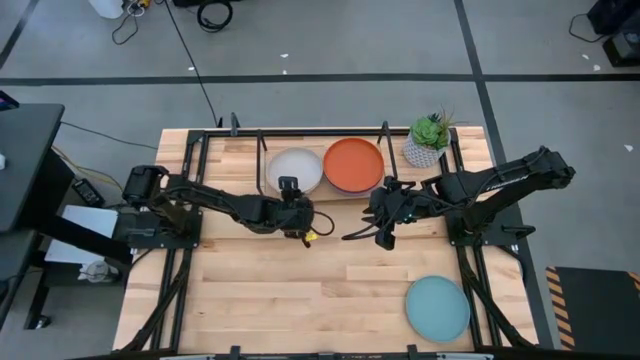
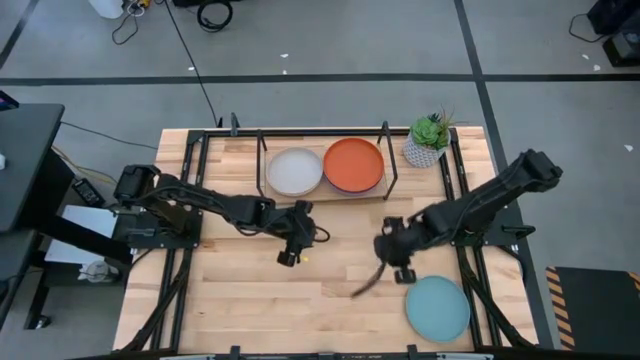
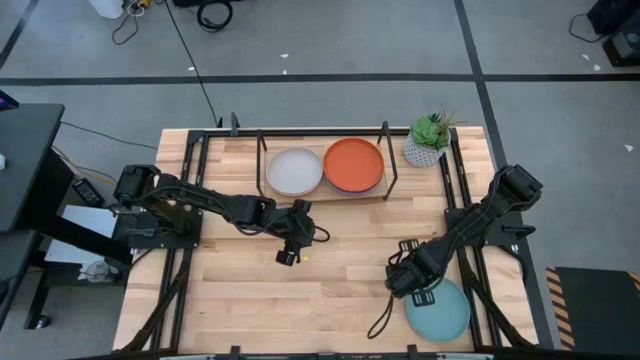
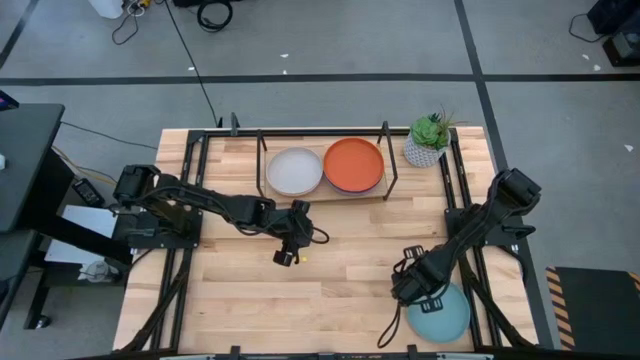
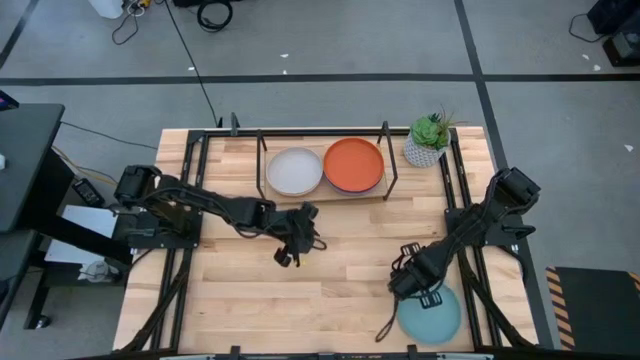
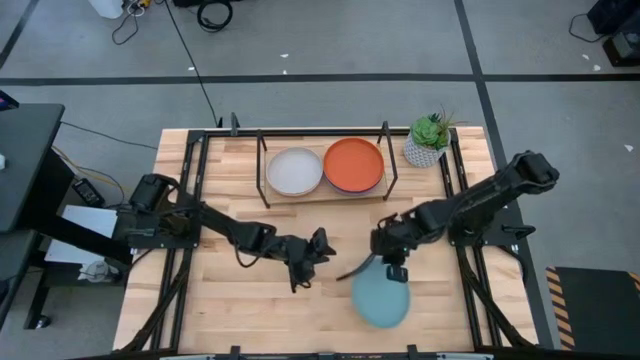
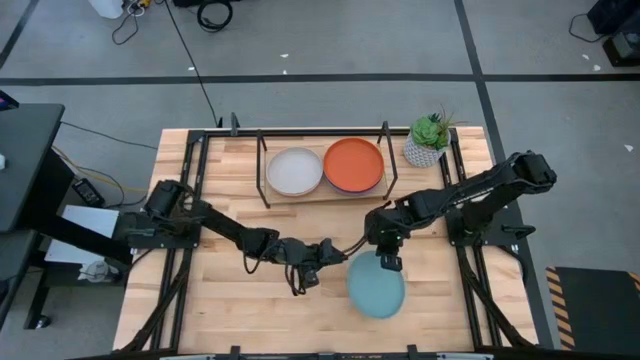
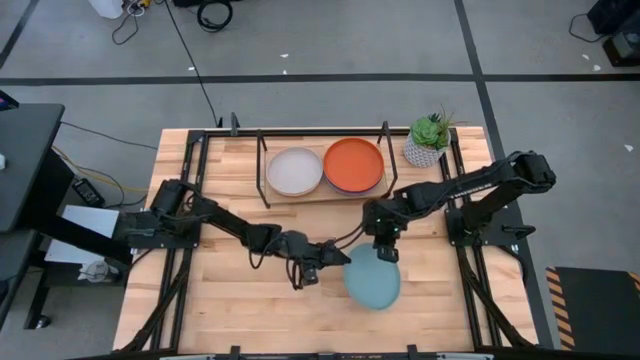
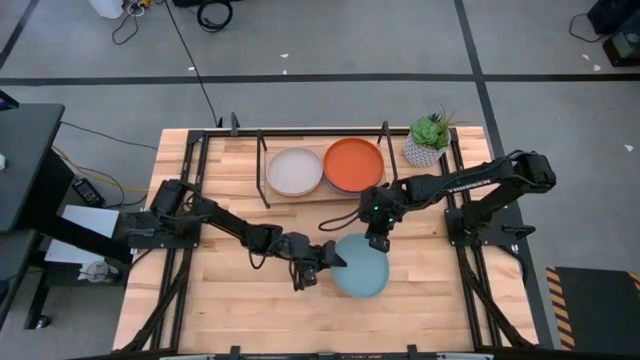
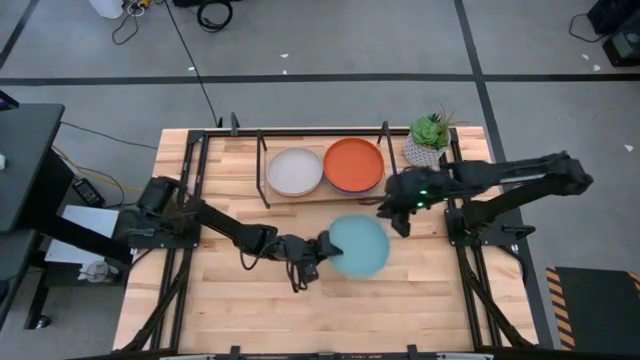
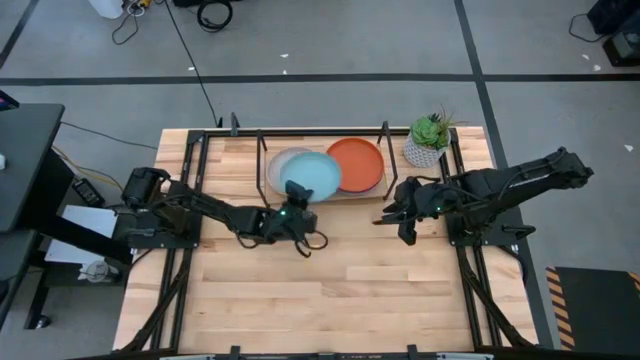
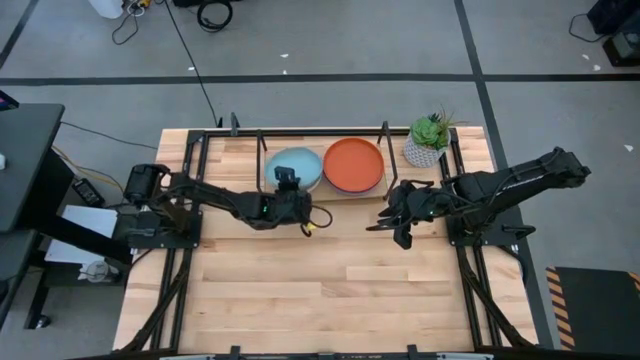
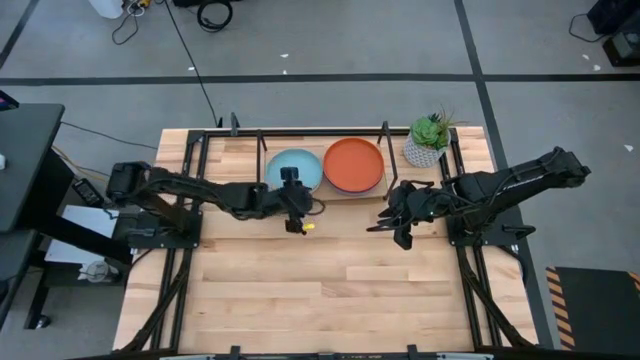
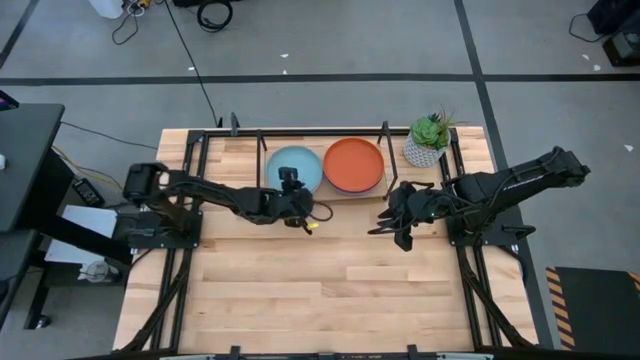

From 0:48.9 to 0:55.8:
Task: Place and stack plates onto a shelf
Stack the light blue plate on top of the gray plate on the shelf

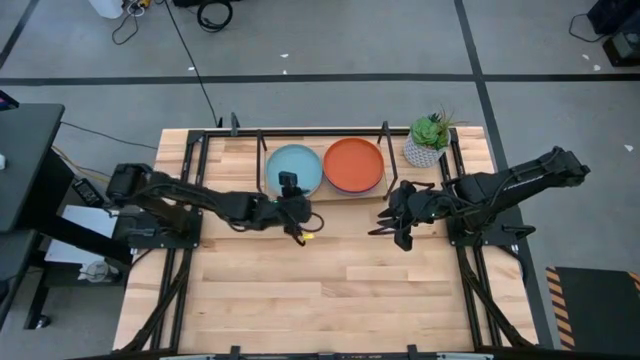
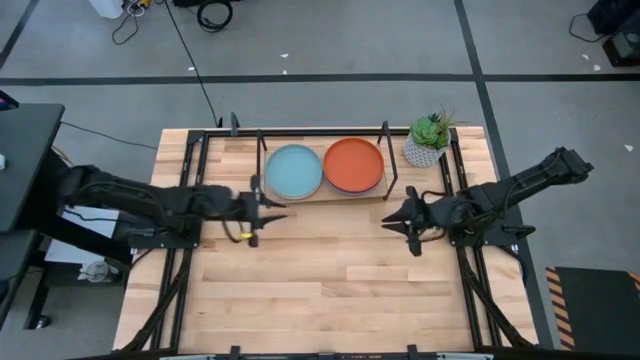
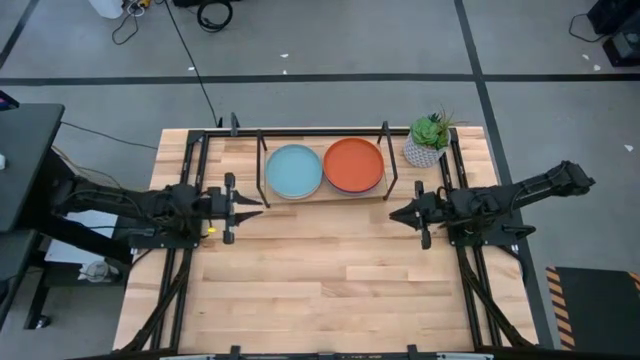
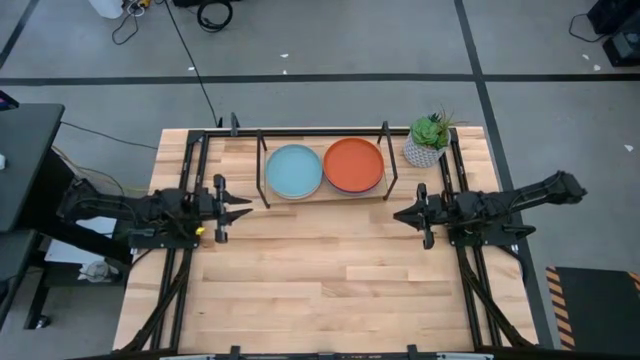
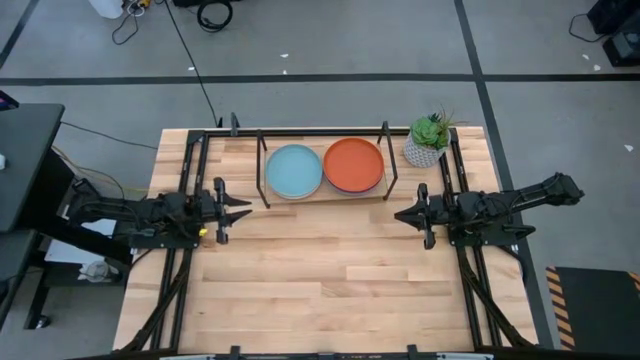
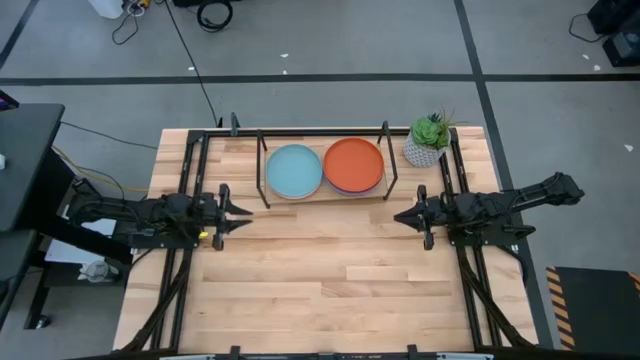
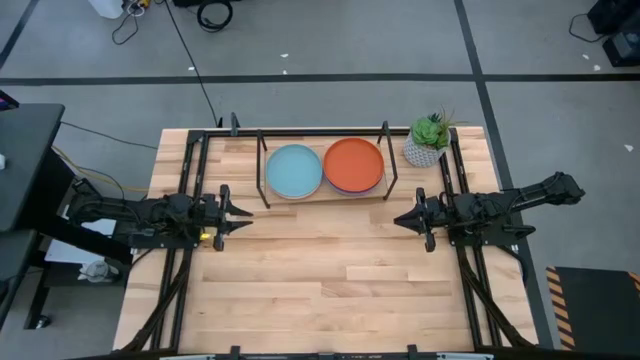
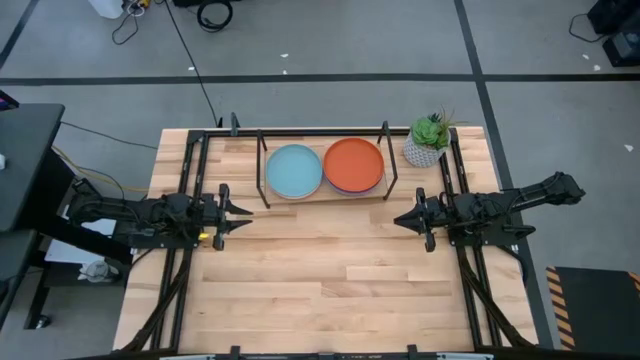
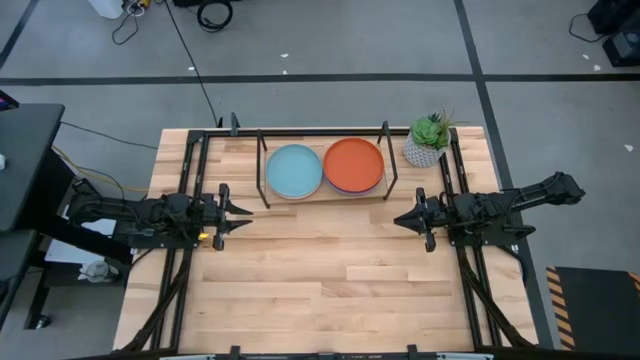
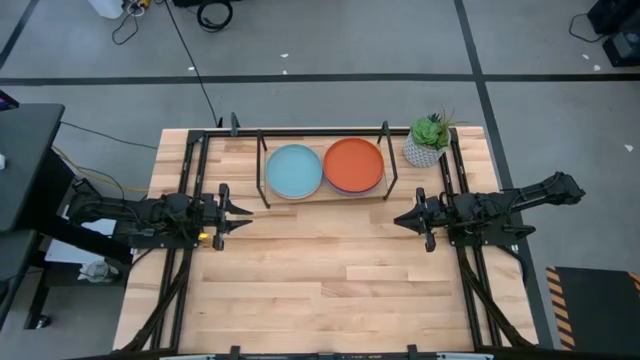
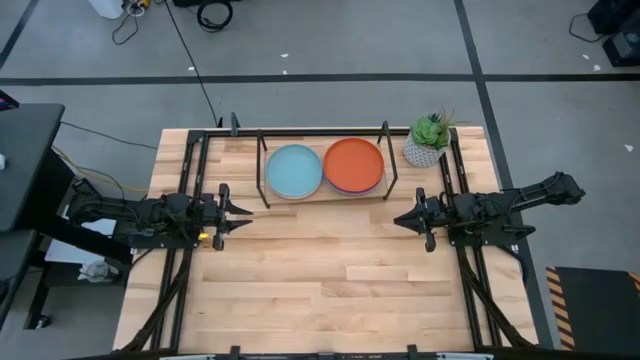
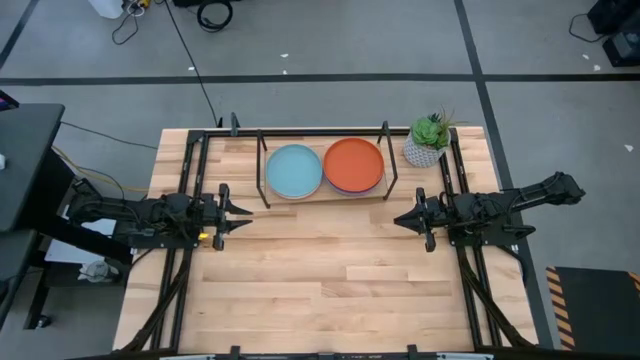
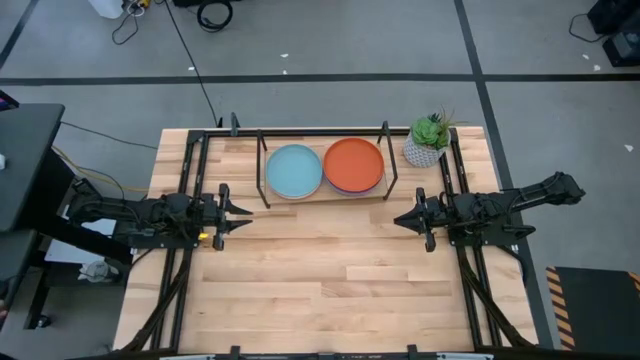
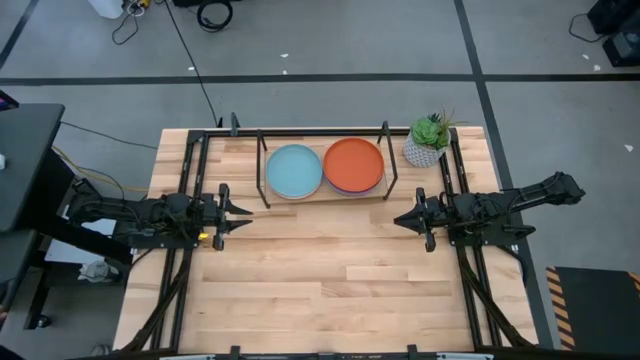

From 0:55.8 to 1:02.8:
Return to Home Position

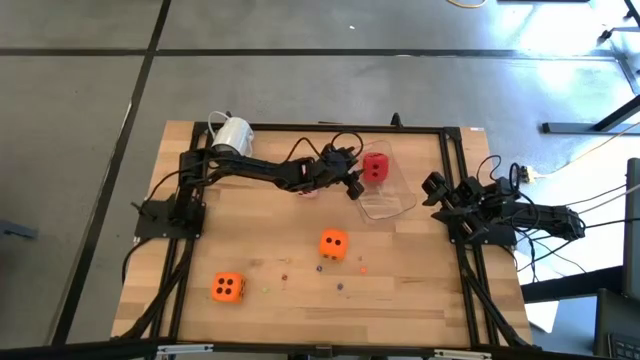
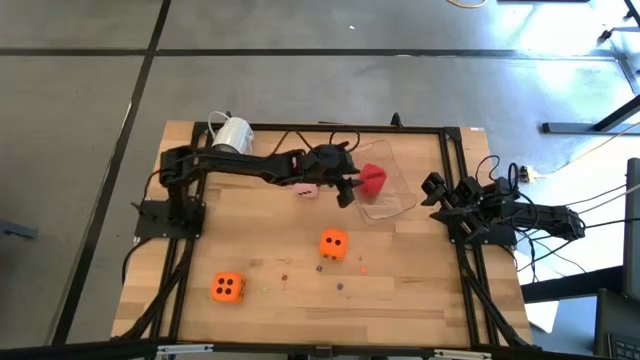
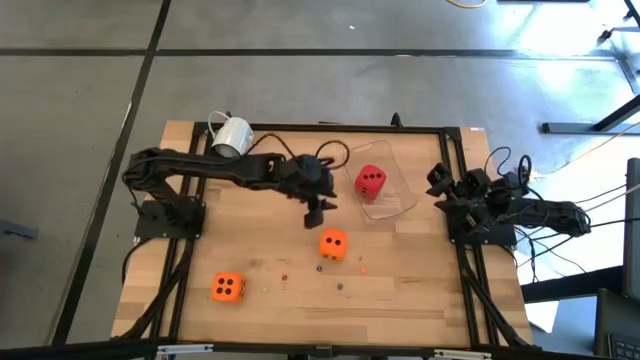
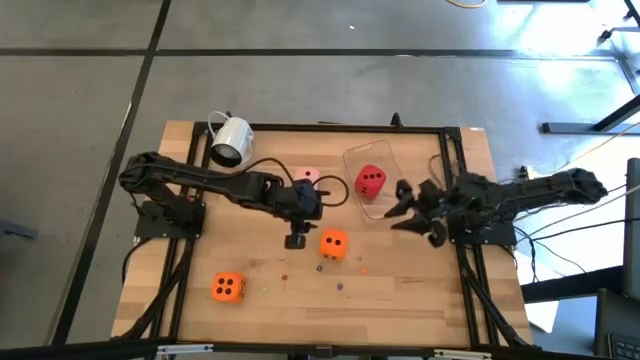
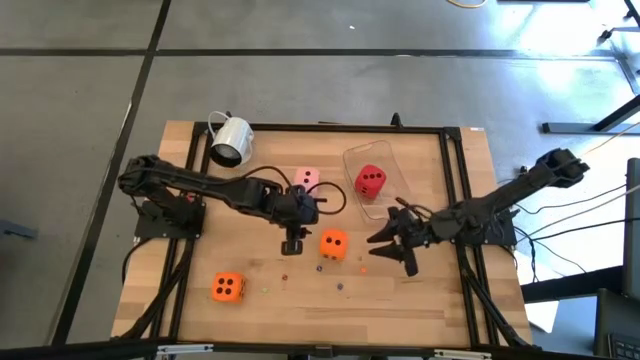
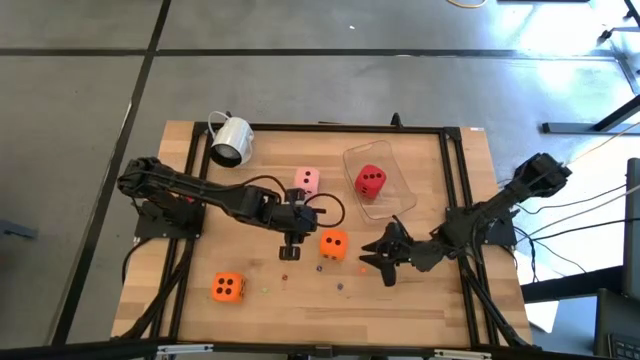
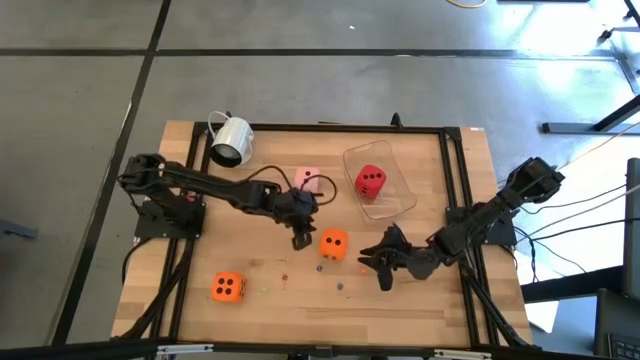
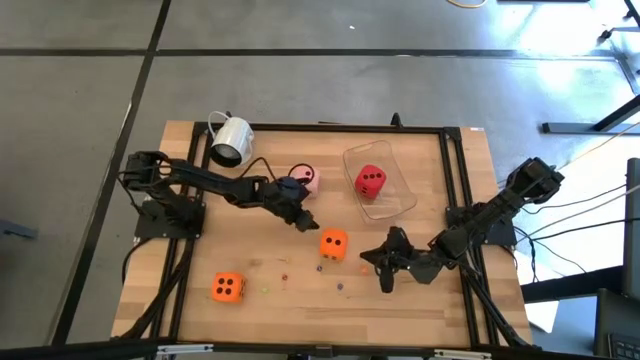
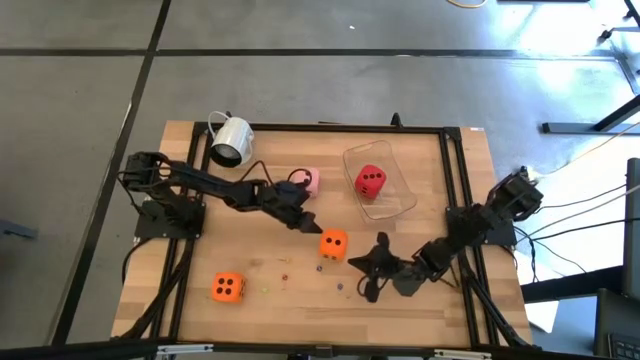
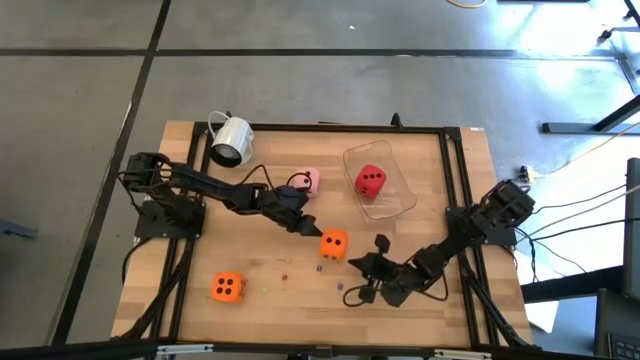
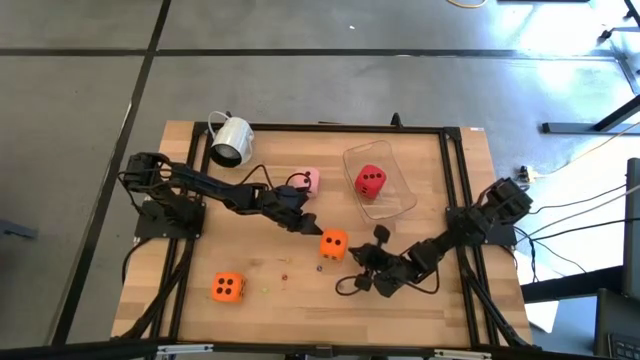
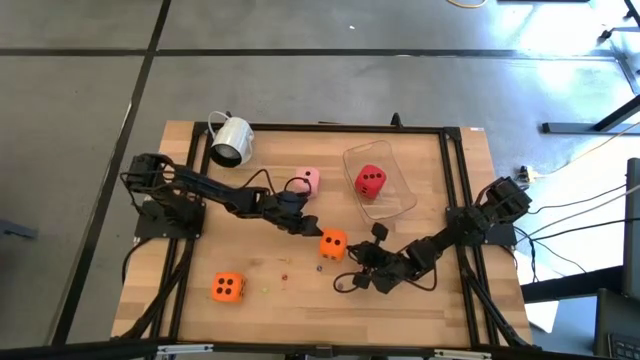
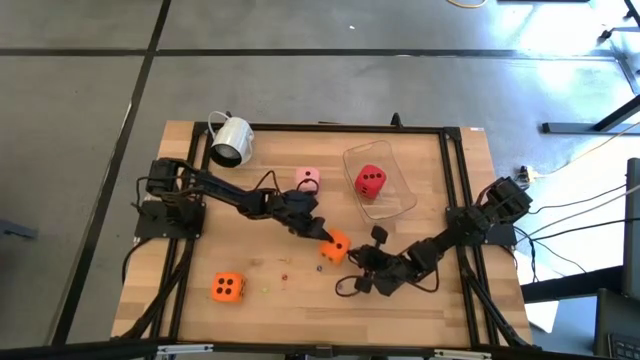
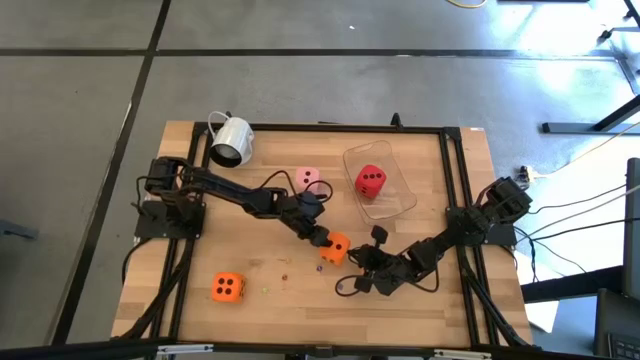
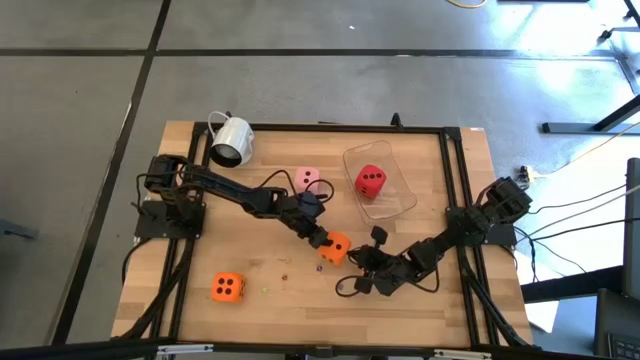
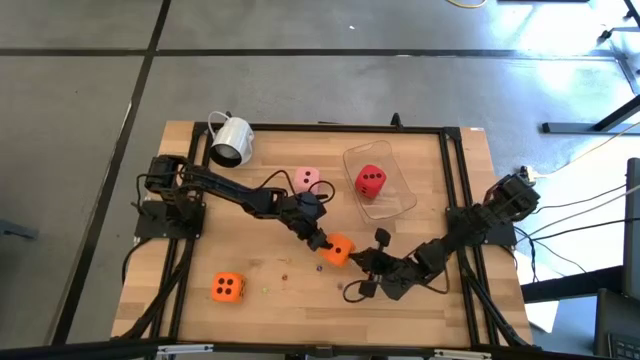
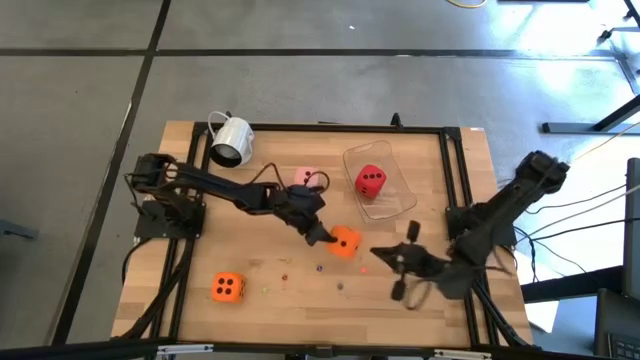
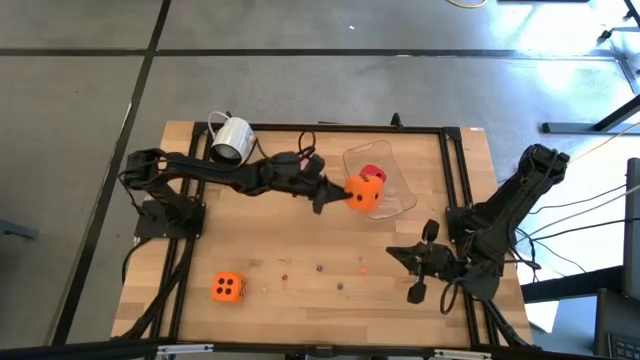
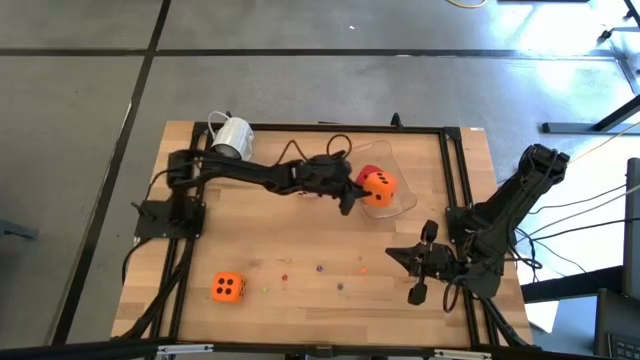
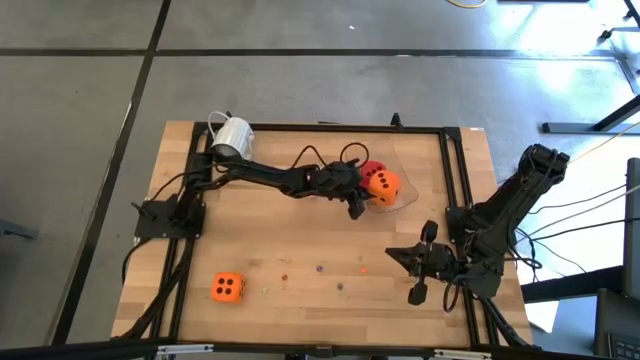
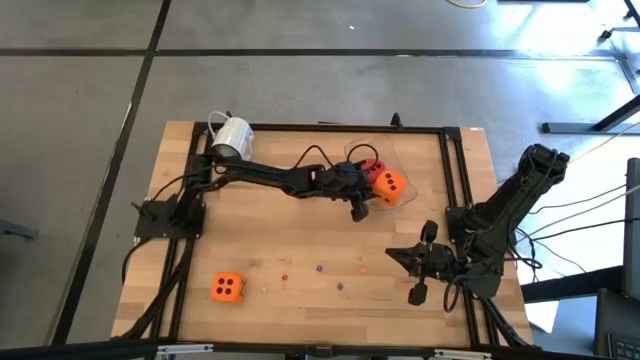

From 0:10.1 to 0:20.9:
Task: Pick & Place Dice
Put the right large orange die in the bin
